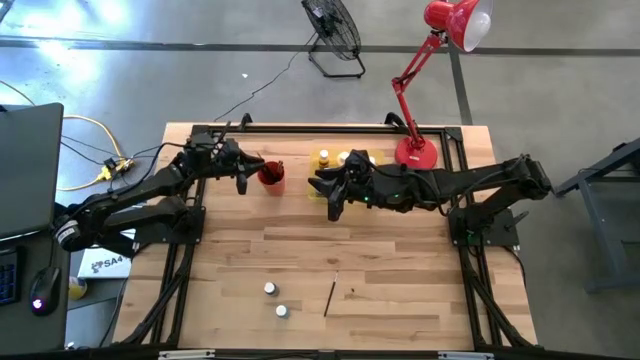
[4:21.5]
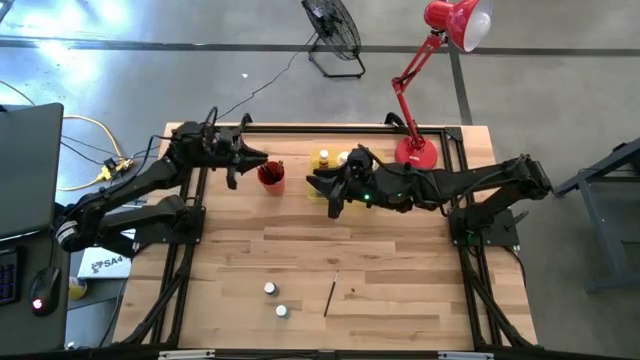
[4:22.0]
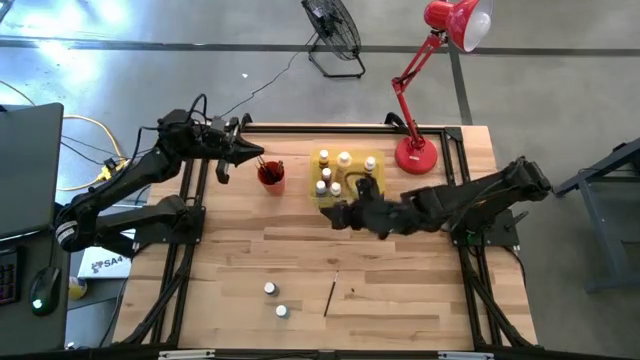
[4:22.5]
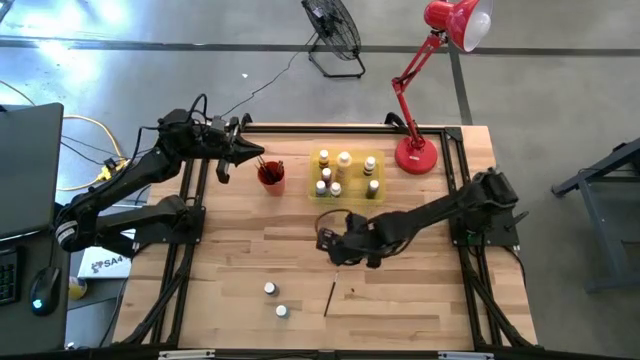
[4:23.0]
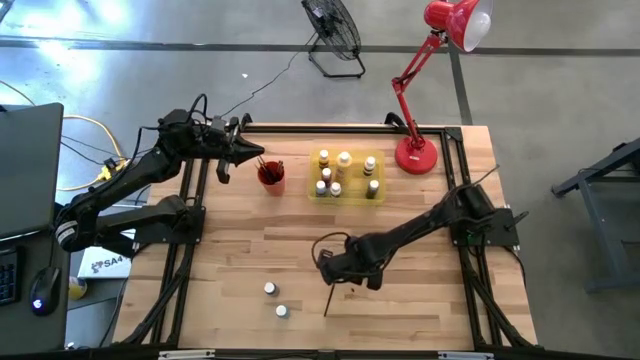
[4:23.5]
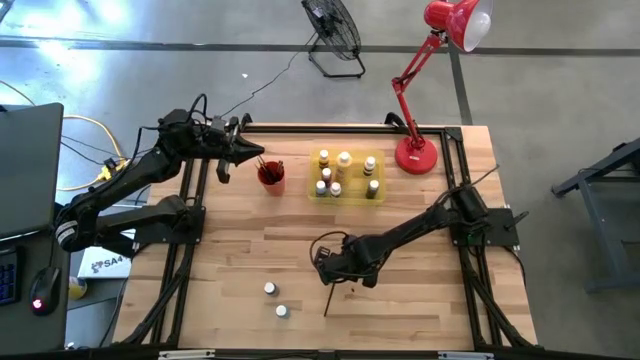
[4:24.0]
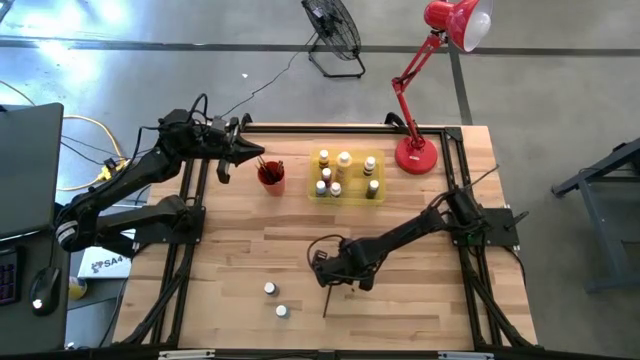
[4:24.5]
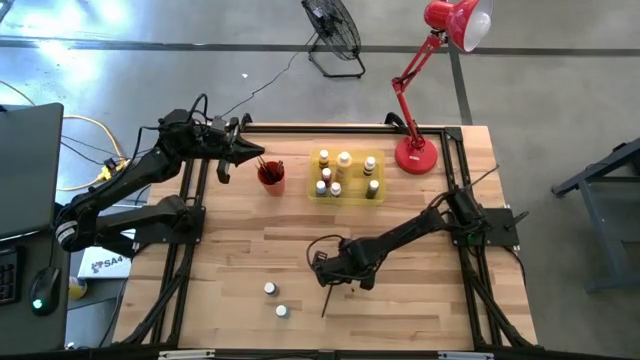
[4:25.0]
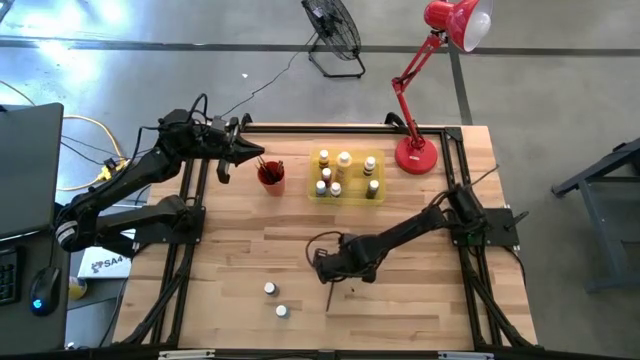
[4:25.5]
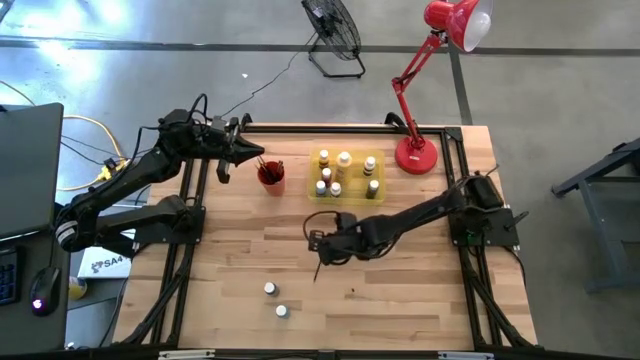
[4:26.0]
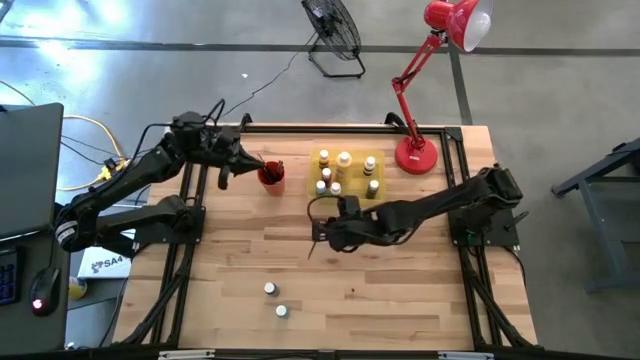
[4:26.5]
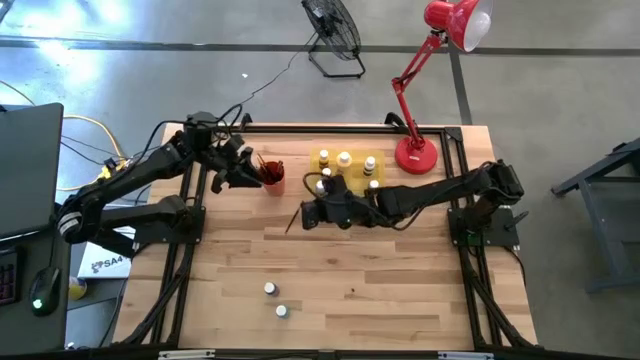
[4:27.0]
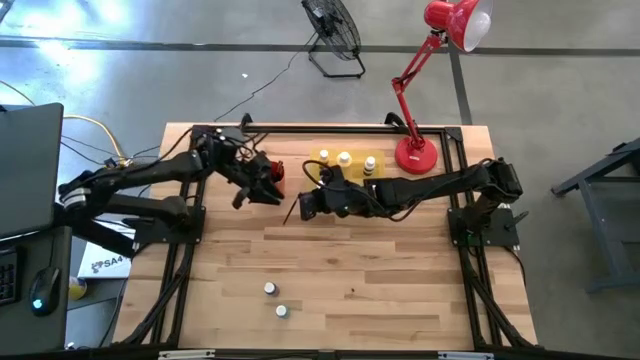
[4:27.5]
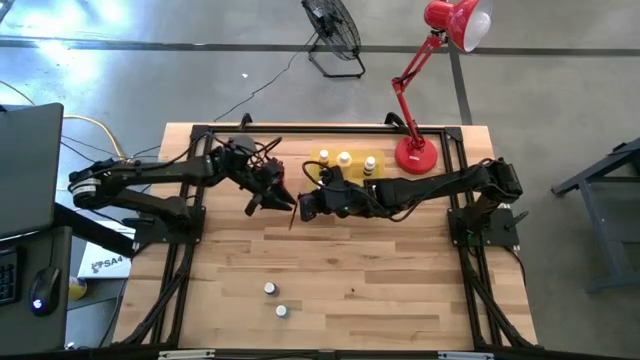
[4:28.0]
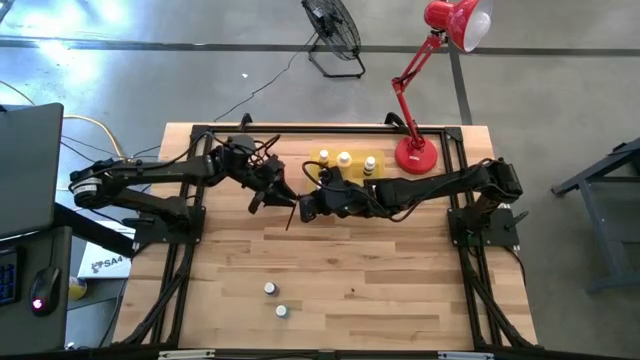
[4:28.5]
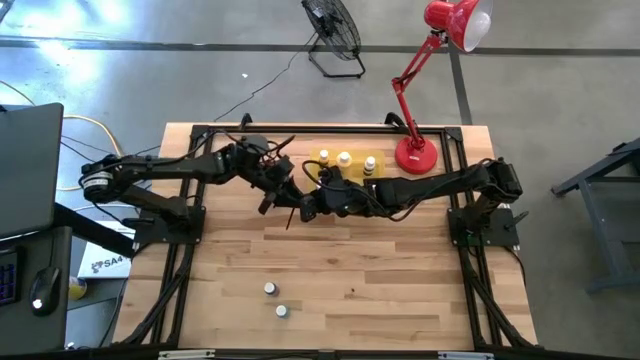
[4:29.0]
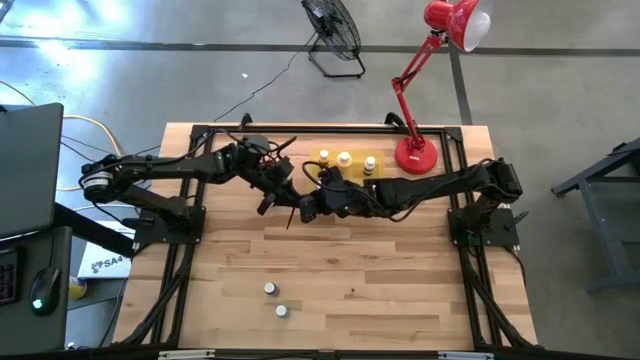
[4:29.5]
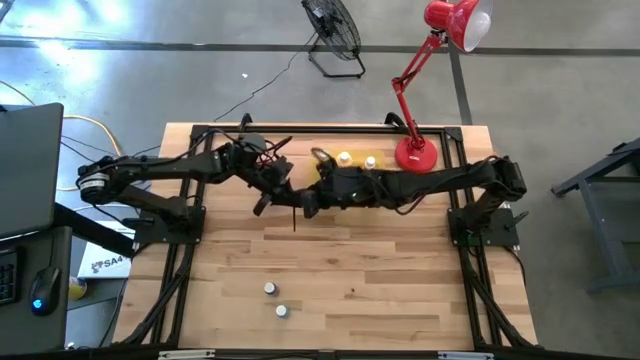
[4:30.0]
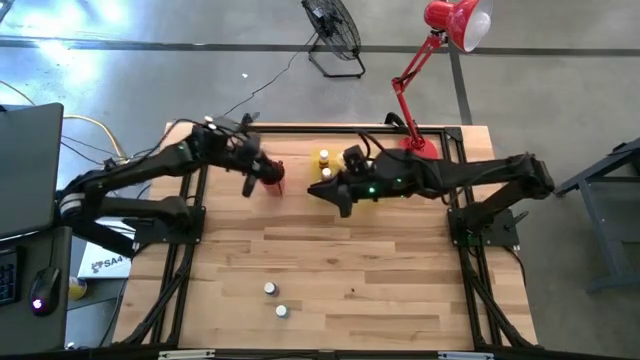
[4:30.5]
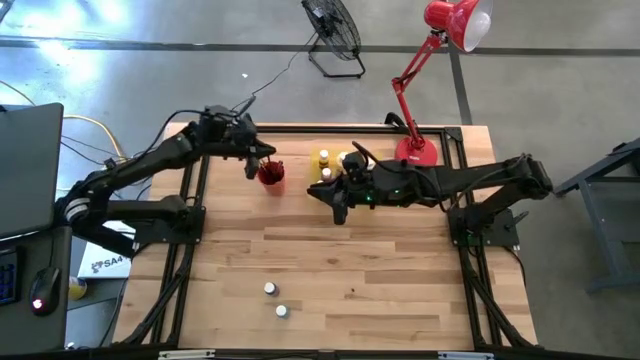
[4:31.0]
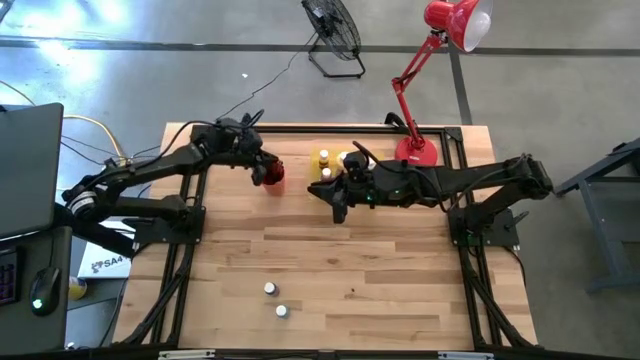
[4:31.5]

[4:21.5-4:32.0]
Task: Pick & Place Paint Supplies
Put the silver paintbrush into the orange cup

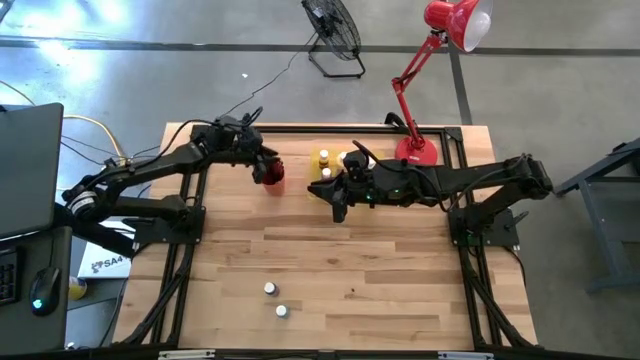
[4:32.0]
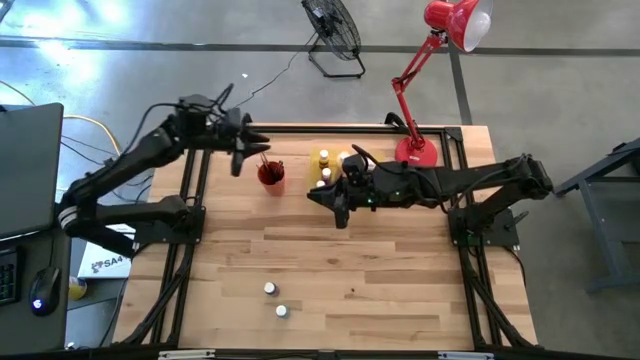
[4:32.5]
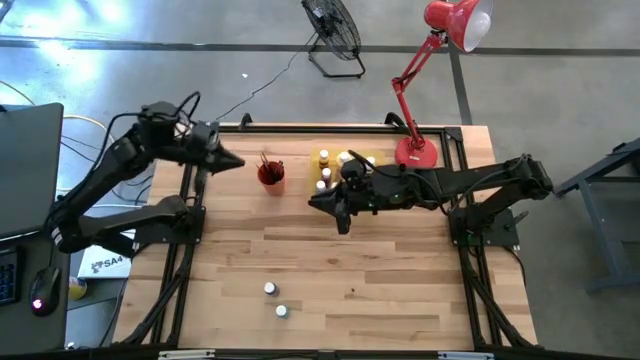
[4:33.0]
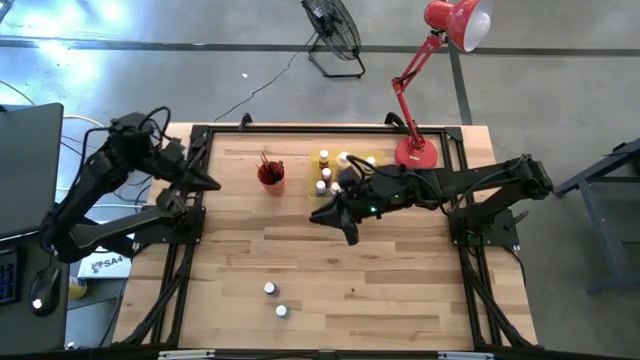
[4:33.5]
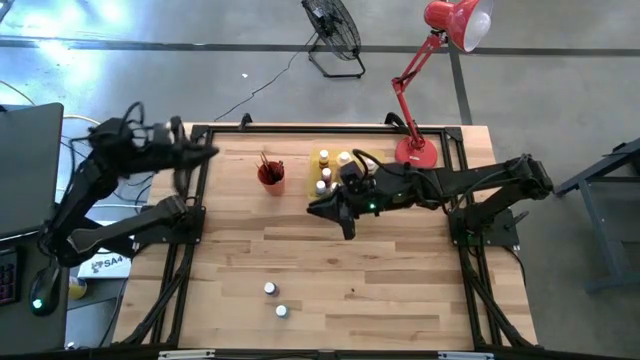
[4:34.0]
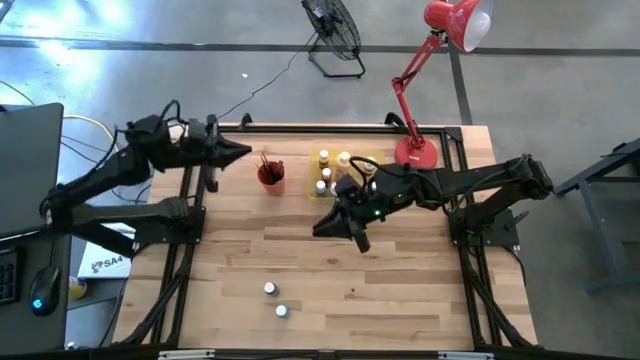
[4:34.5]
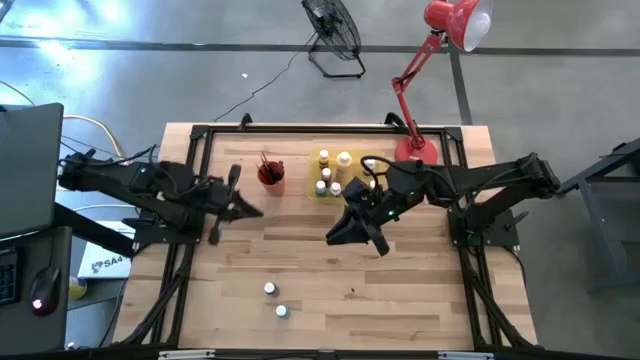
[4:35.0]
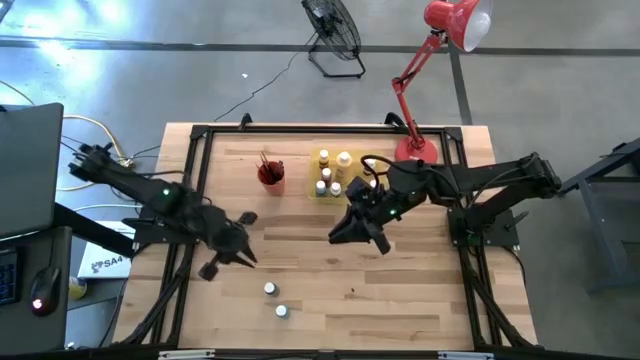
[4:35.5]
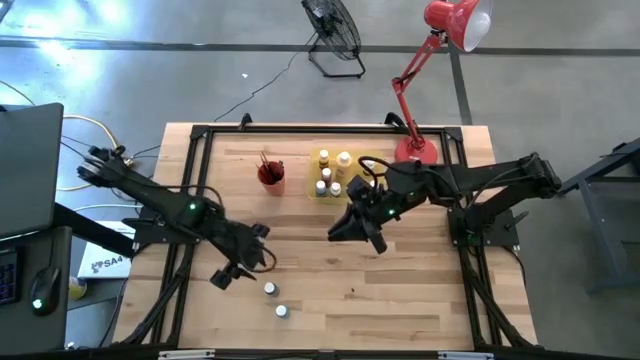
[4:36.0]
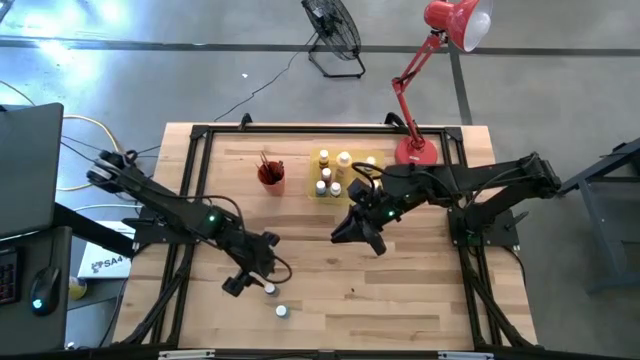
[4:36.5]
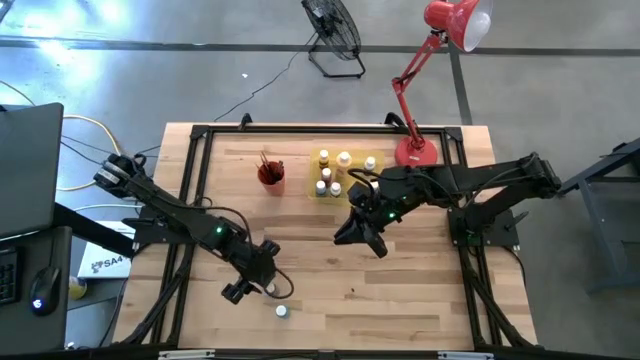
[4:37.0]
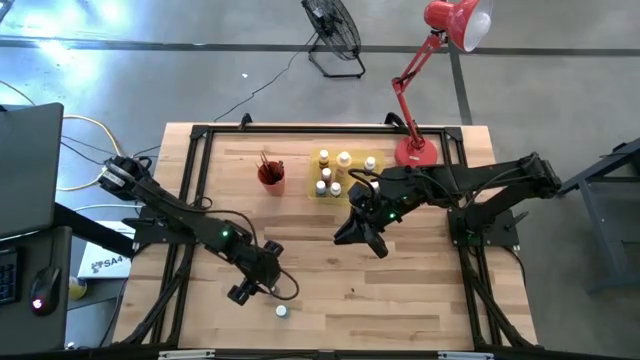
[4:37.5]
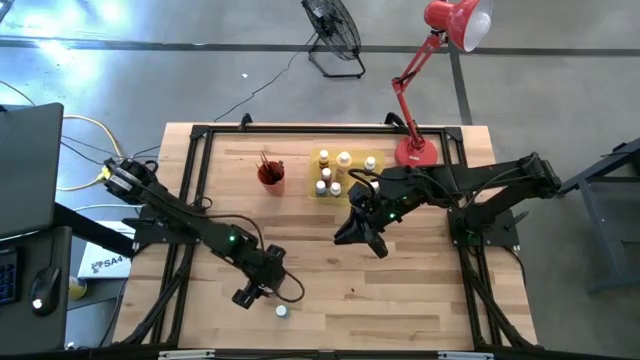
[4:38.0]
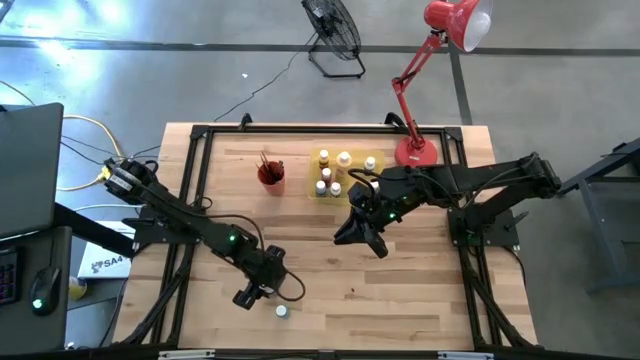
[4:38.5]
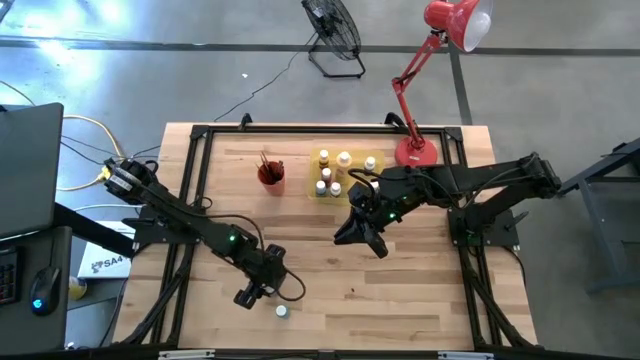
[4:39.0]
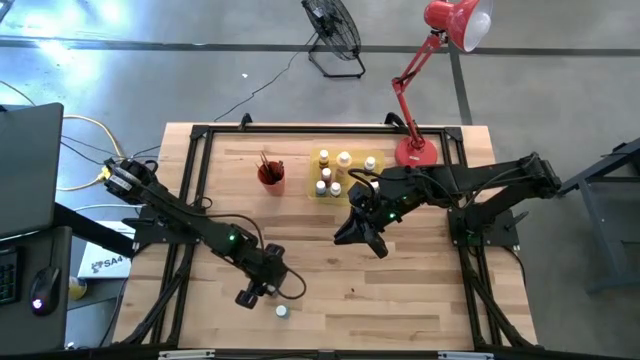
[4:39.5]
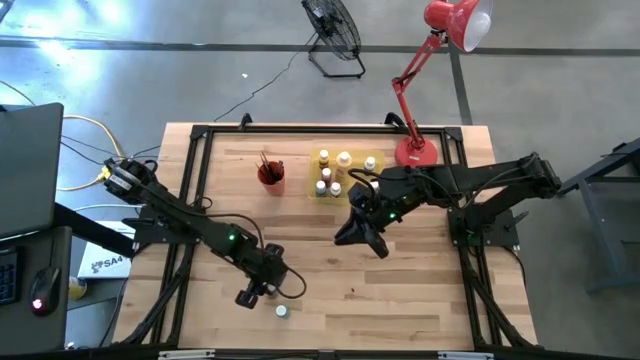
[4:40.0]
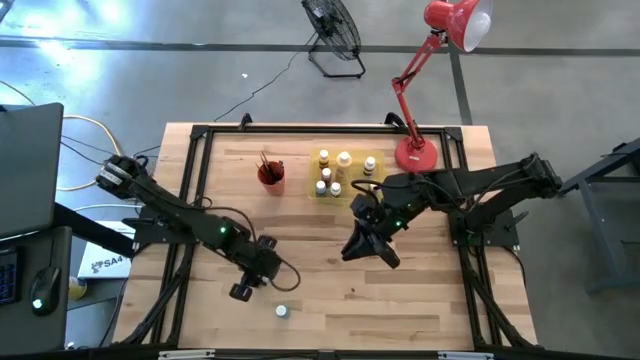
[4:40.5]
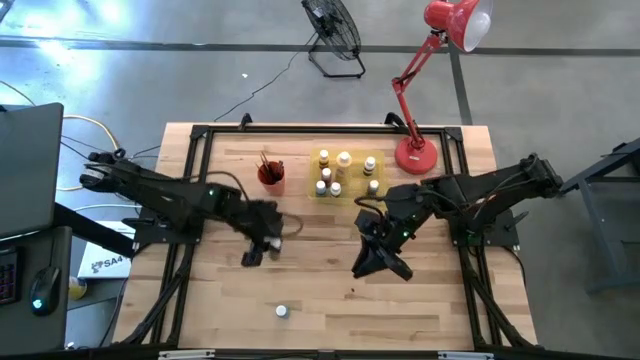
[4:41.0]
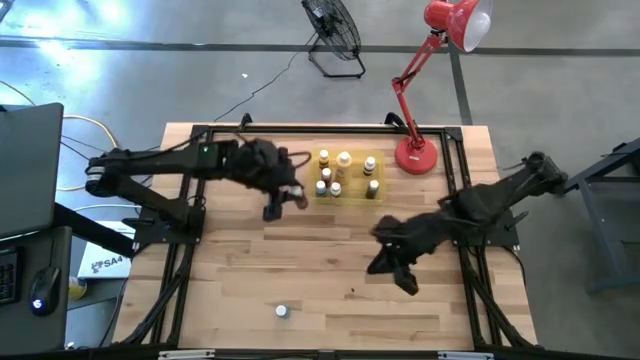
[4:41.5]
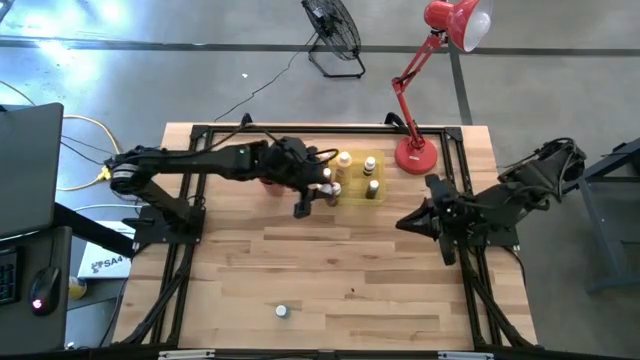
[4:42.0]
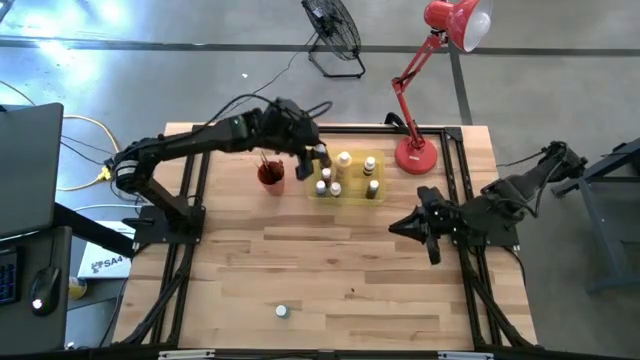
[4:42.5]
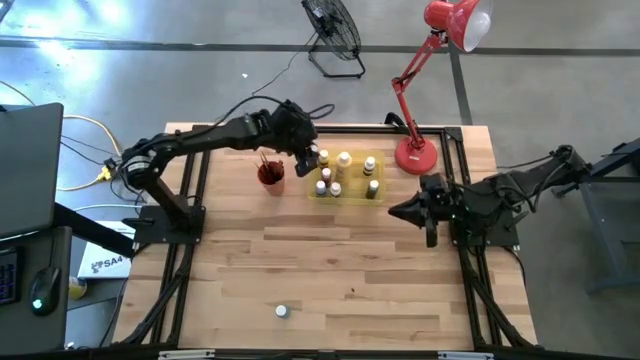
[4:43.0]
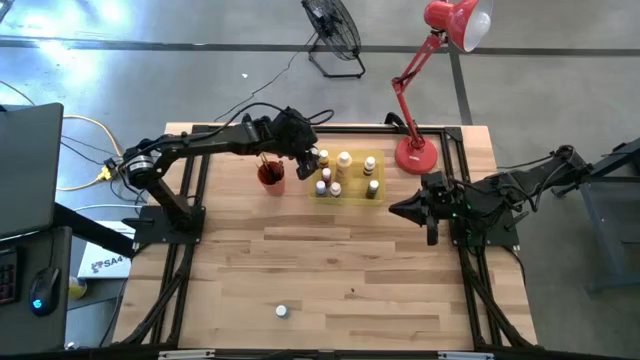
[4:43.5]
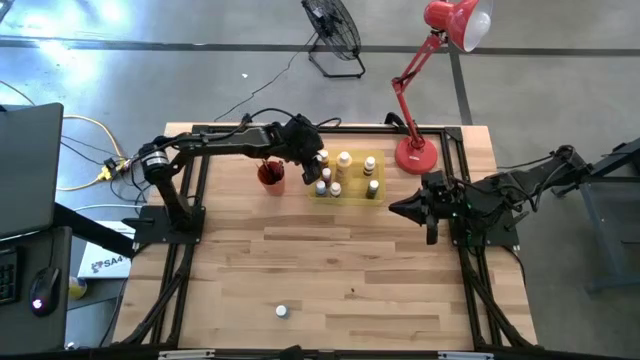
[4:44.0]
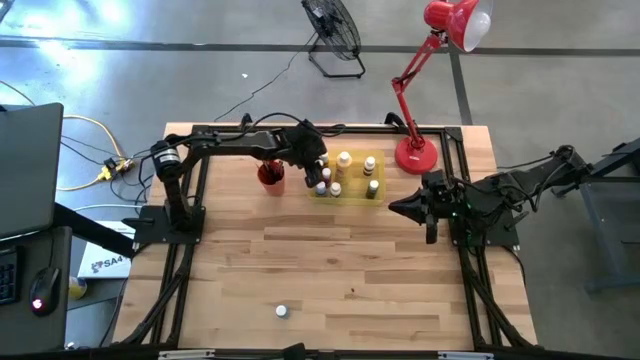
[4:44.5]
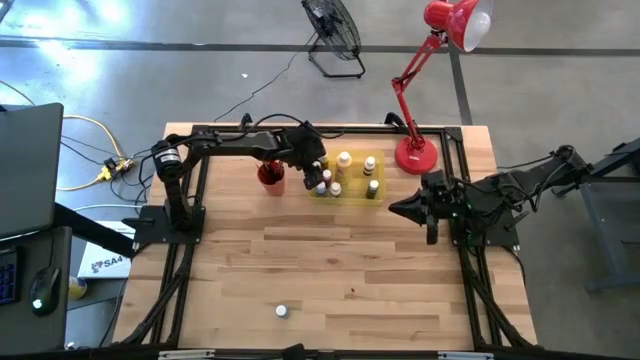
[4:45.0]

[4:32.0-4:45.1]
Put the dark blue paint bottle into the yellow bin
